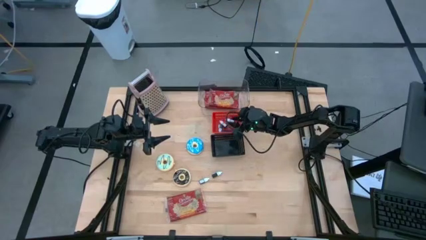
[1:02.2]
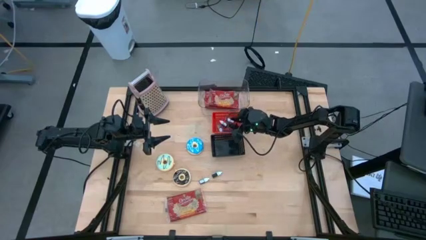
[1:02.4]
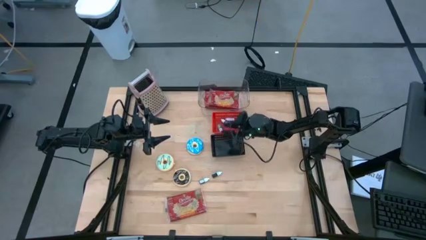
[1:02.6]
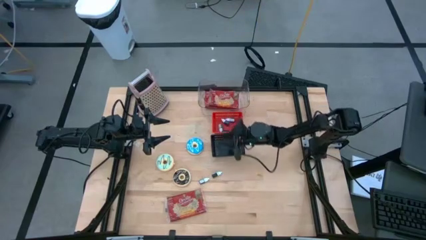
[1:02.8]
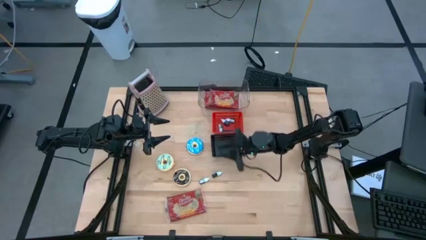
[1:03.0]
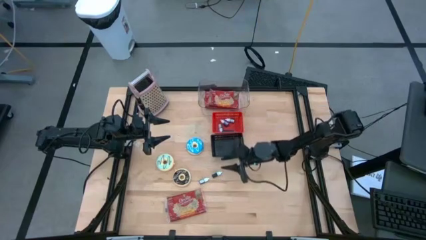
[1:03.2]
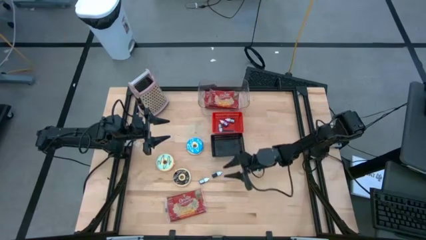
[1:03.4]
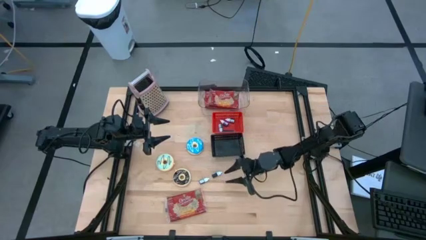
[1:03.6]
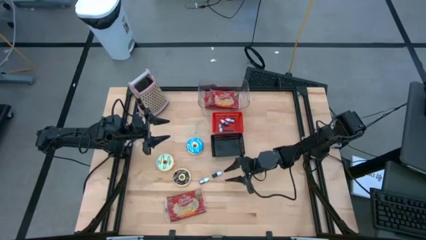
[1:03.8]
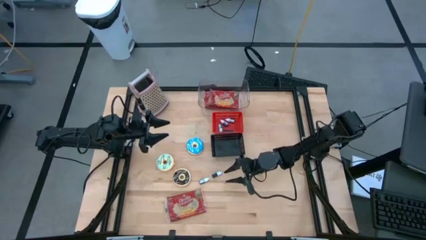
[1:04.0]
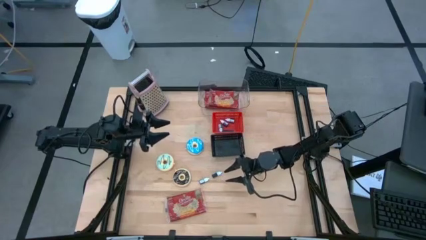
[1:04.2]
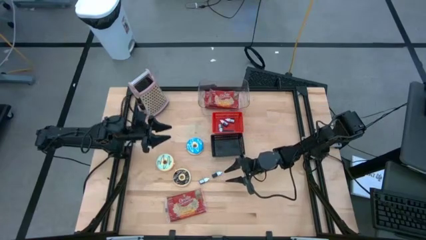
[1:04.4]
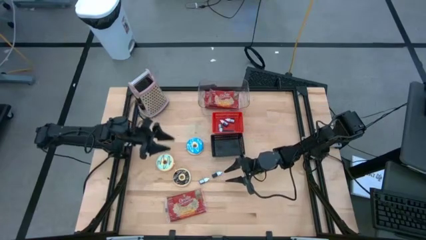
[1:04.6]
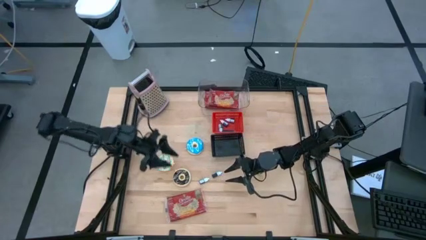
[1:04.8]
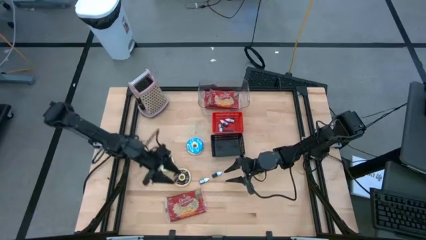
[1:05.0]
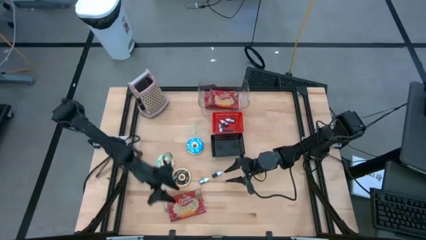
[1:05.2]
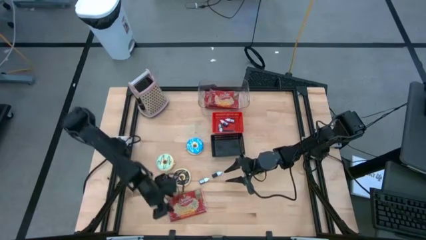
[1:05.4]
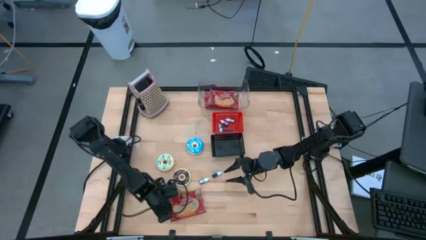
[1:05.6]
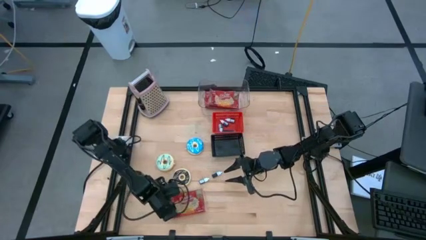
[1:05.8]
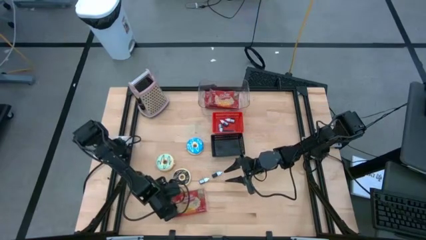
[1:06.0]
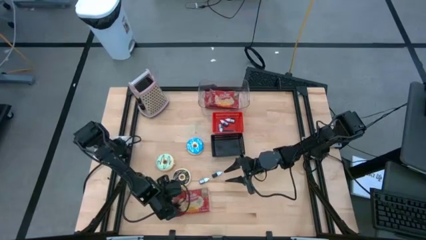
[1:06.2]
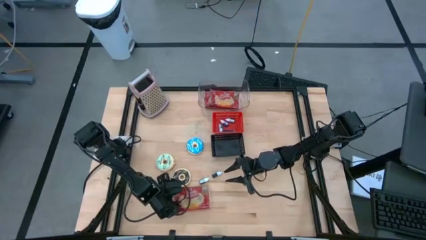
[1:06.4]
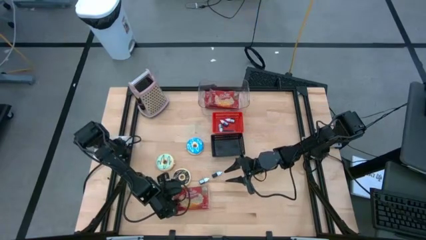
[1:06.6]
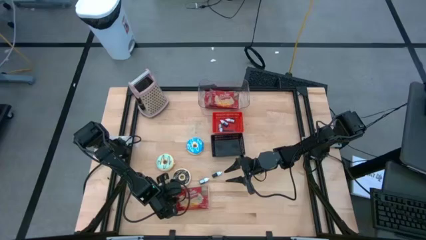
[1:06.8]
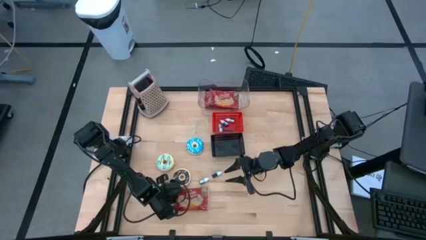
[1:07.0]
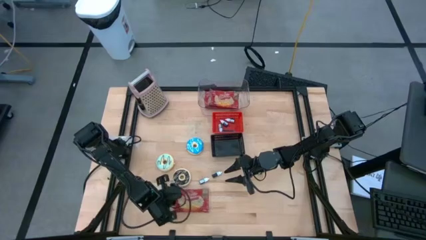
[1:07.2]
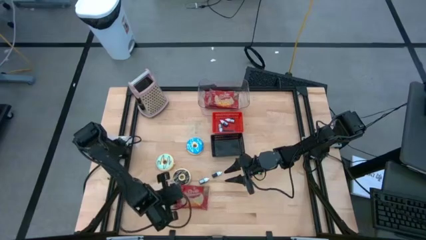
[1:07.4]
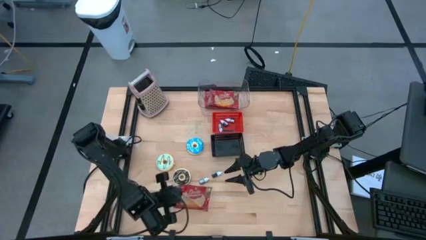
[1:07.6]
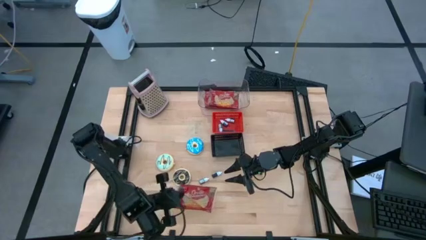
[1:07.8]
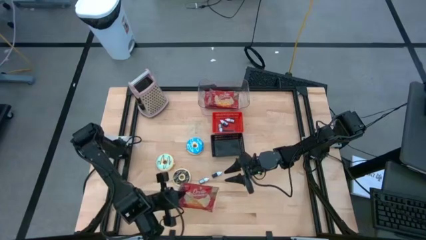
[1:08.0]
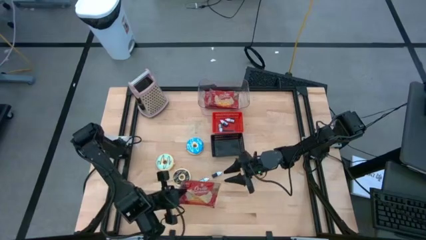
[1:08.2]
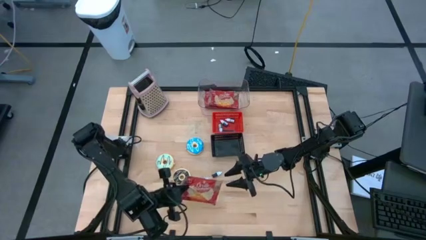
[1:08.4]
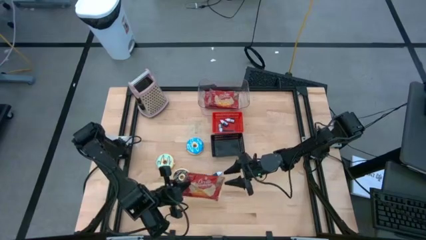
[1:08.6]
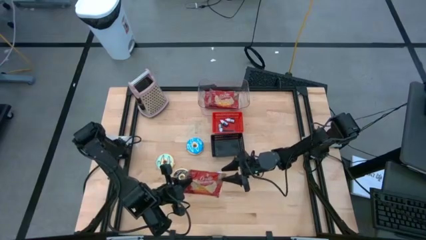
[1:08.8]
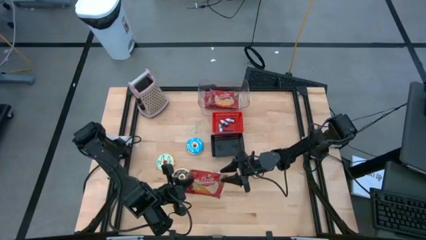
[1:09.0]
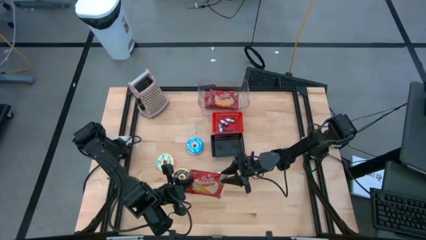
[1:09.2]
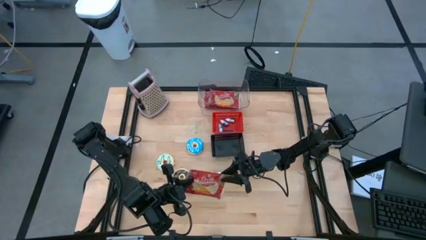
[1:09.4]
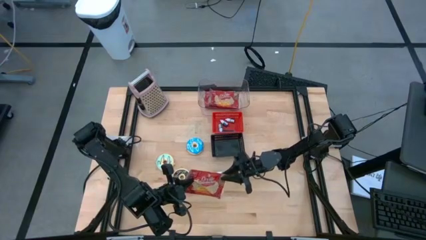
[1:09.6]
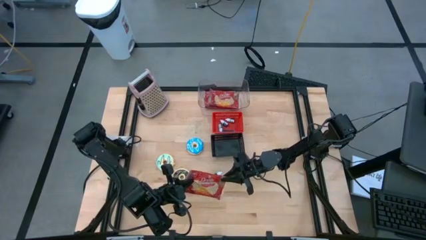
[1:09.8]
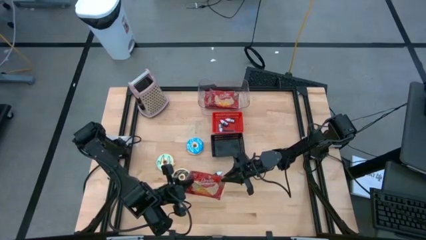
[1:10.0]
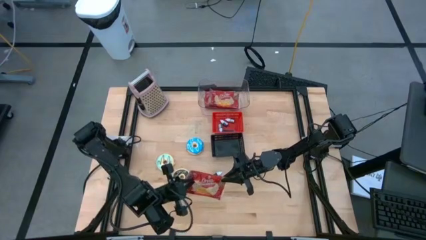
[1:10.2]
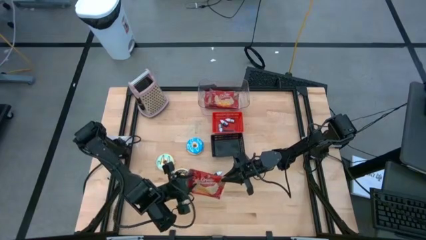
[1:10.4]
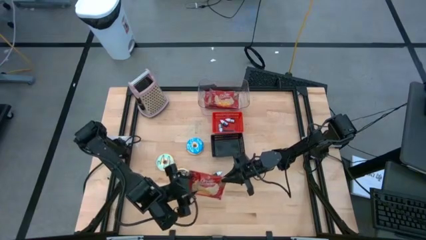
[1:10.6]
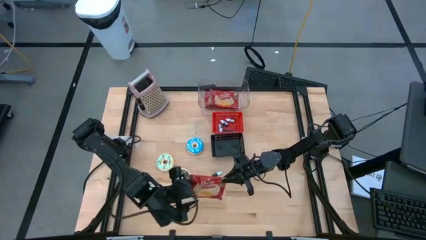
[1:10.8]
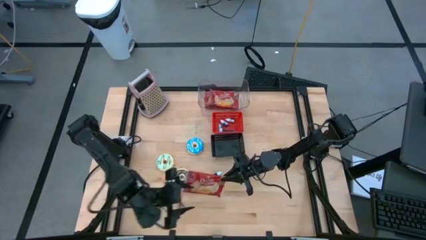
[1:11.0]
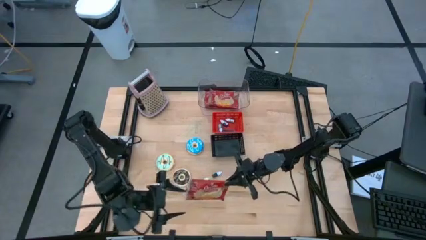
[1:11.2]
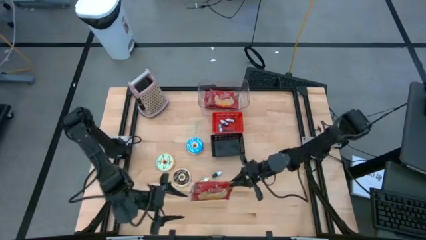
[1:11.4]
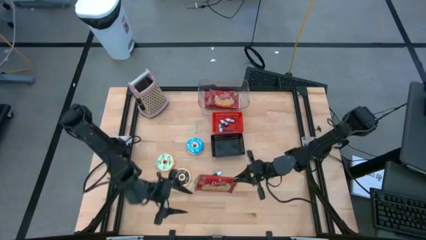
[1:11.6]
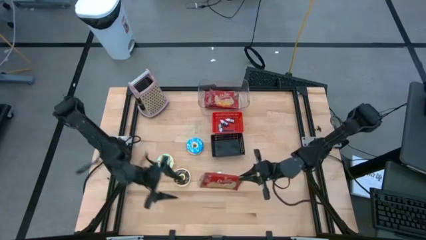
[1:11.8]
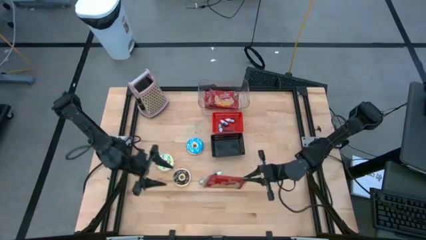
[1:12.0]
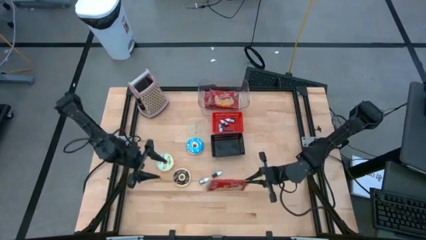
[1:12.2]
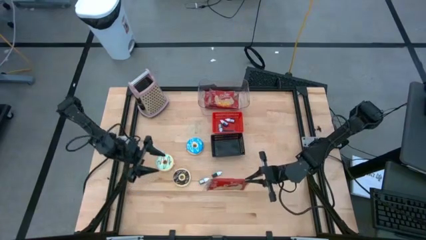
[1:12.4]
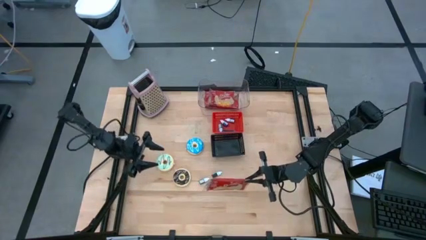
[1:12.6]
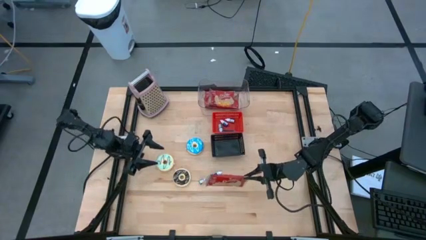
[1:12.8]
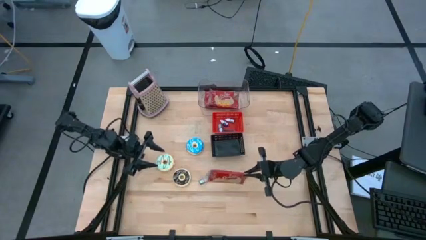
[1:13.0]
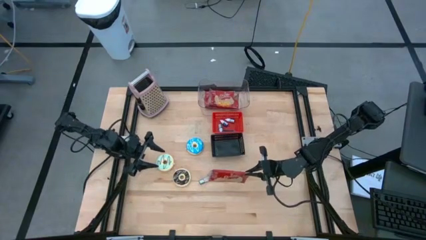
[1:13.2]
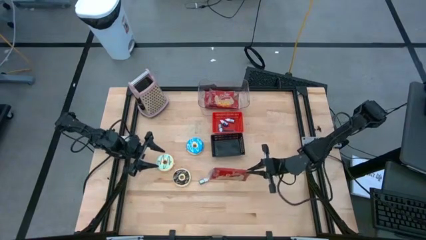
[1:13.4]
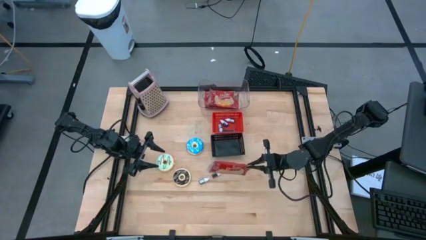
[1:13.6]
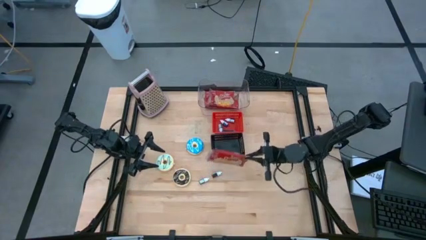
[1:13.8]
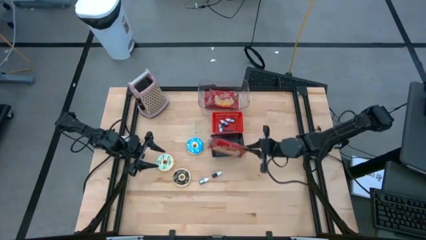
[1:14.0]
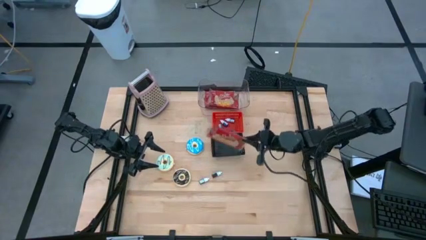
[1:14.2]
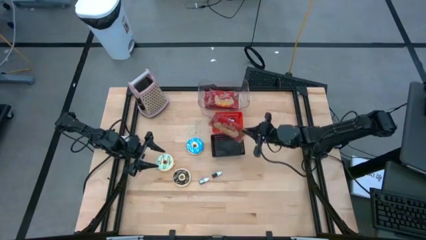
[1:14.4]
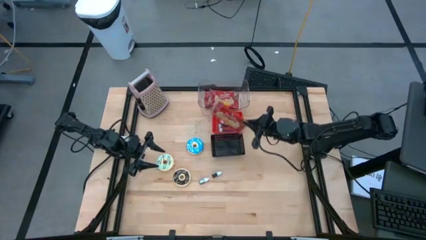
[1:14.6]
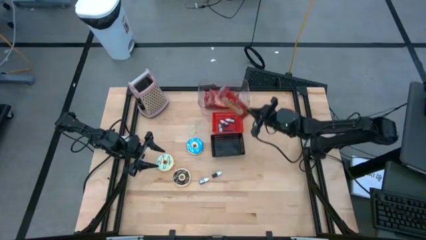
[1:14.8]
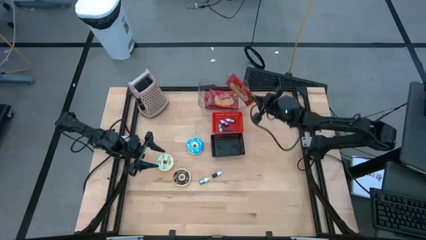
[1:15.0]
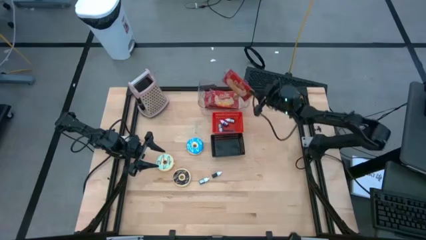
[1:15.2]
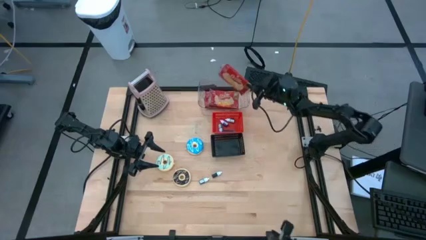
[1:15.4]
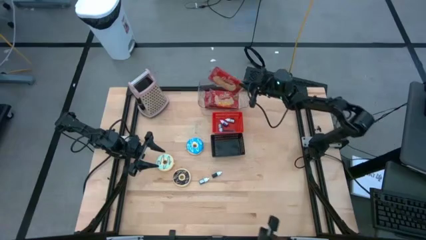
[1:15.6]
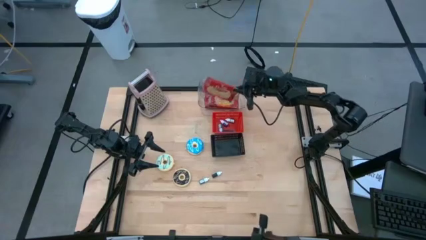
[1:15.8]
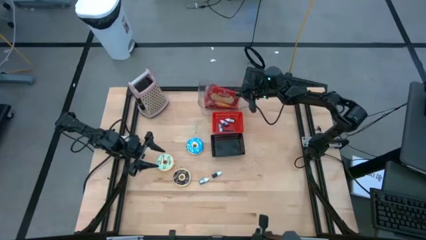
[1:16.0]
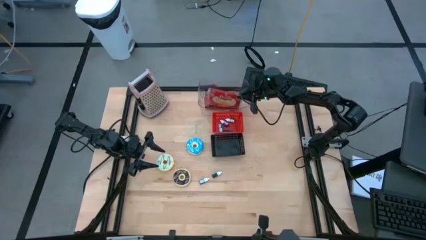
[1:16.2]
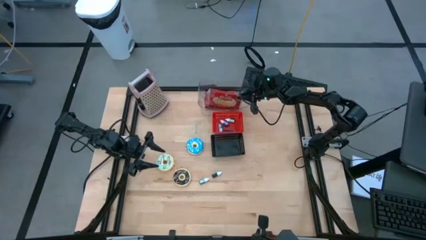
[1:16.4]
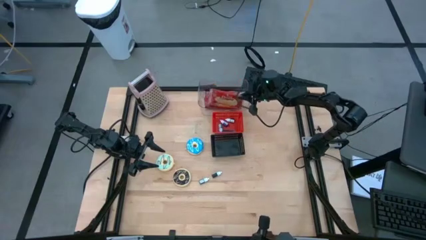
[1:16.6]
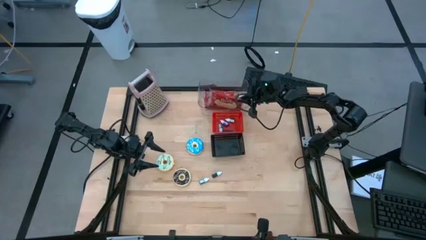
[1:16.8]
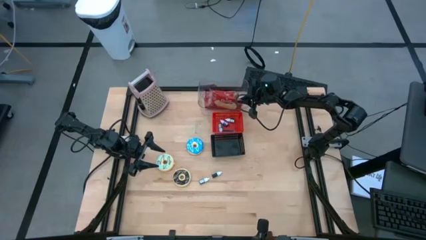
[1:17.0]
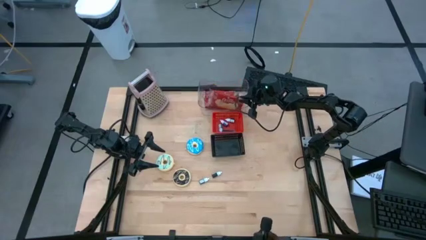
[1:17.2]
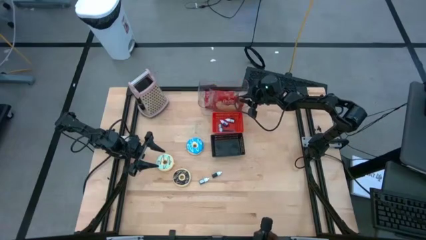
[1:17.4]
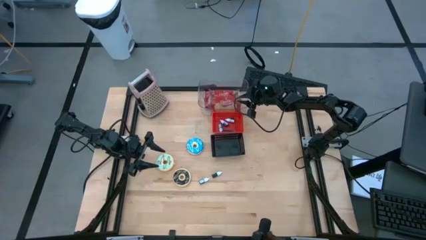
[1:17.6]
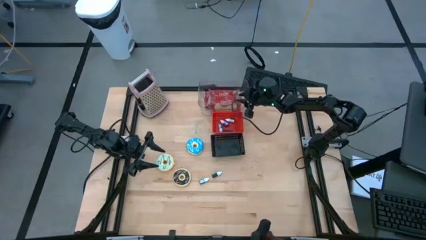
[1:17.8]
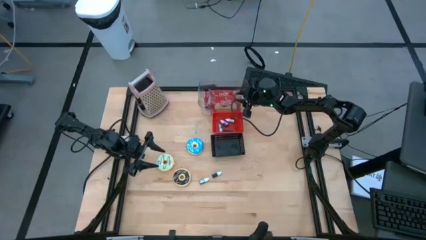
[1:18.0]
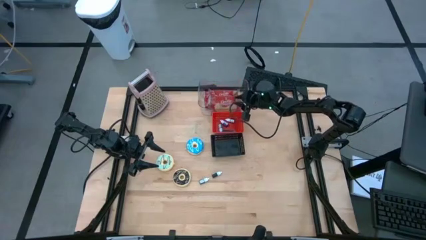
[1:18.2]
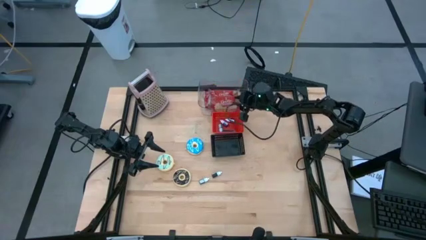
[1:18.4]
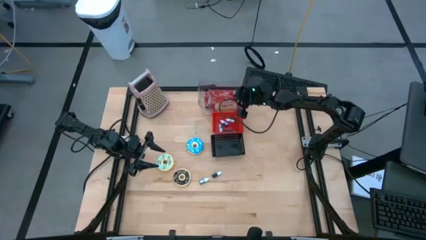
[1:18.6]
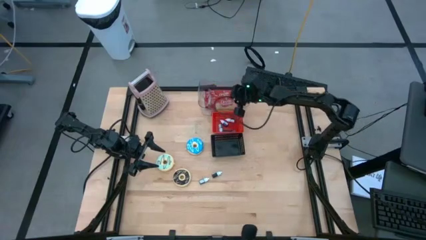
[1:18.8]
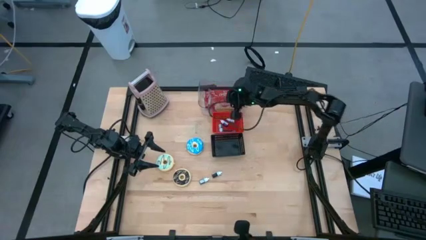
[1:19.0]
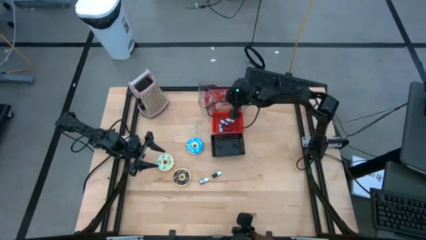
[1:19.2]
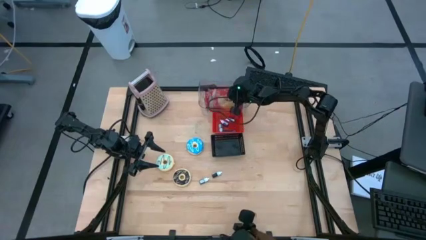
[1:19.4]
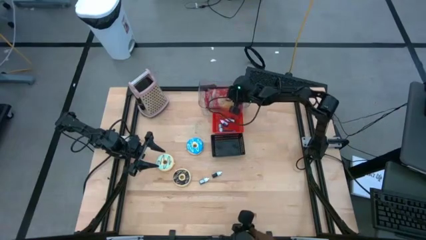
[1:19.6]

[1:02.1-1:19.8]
Put the popcorn pack into the transparent bin
